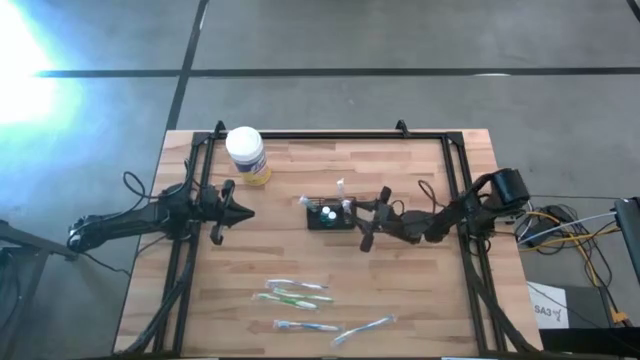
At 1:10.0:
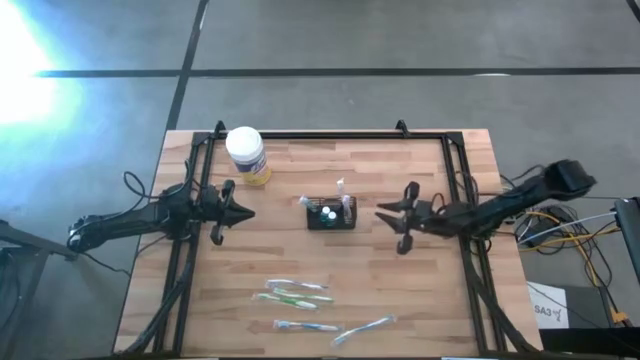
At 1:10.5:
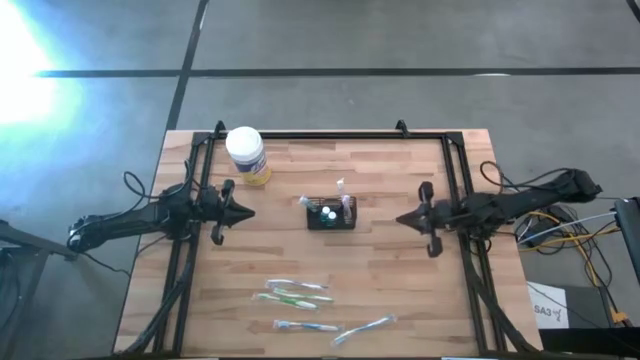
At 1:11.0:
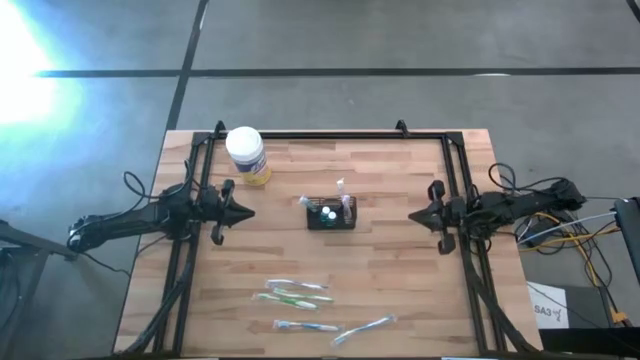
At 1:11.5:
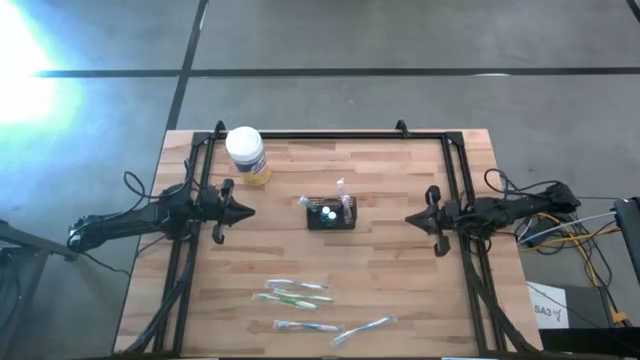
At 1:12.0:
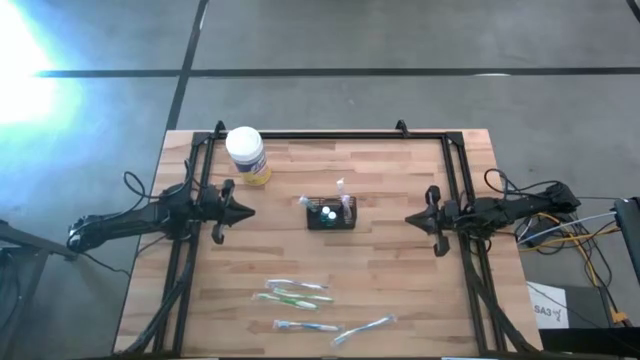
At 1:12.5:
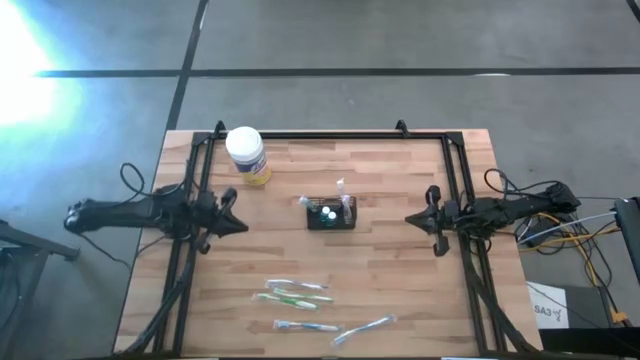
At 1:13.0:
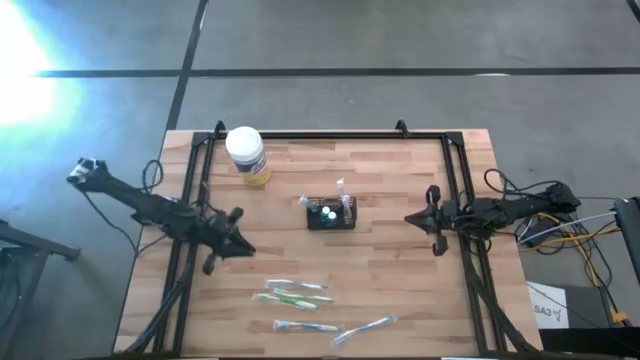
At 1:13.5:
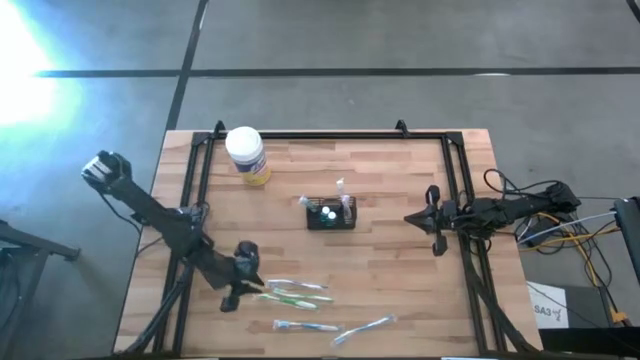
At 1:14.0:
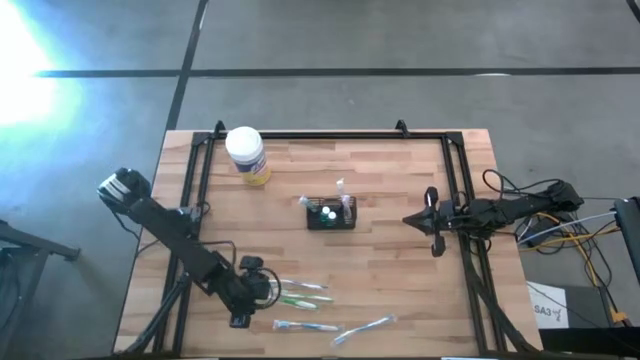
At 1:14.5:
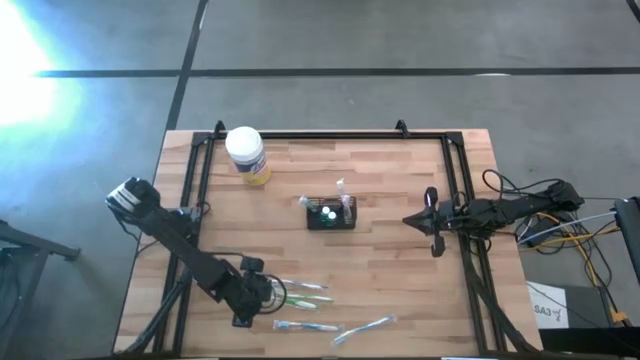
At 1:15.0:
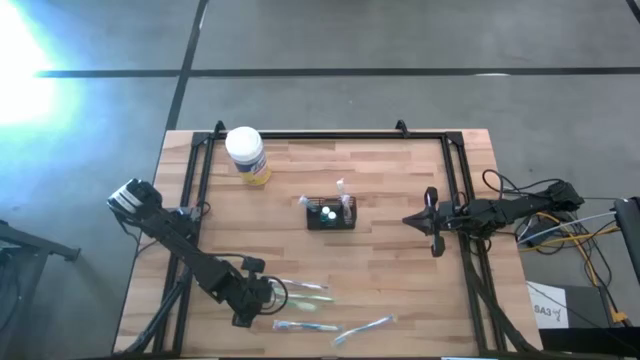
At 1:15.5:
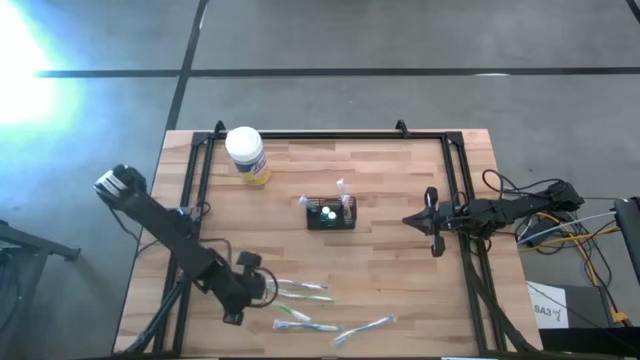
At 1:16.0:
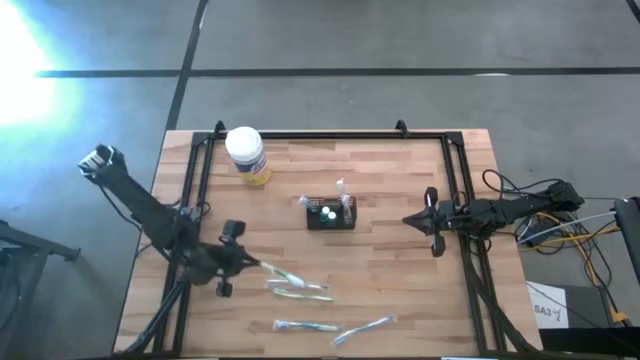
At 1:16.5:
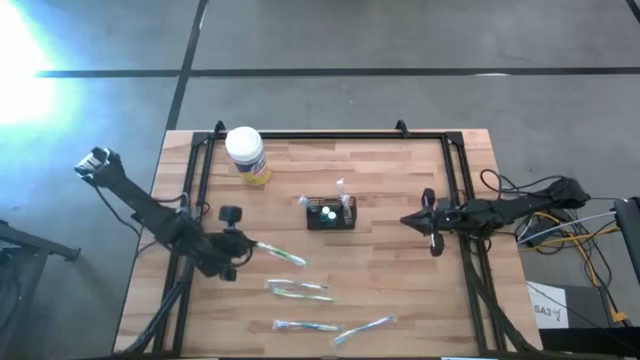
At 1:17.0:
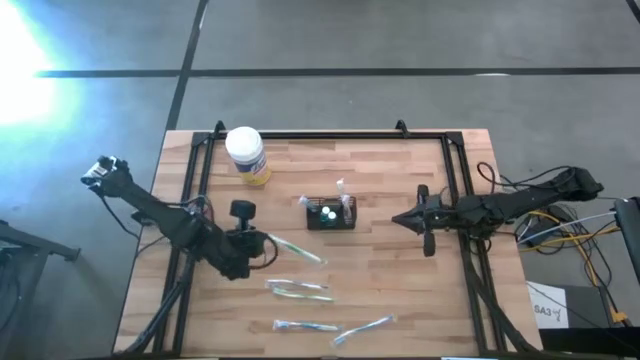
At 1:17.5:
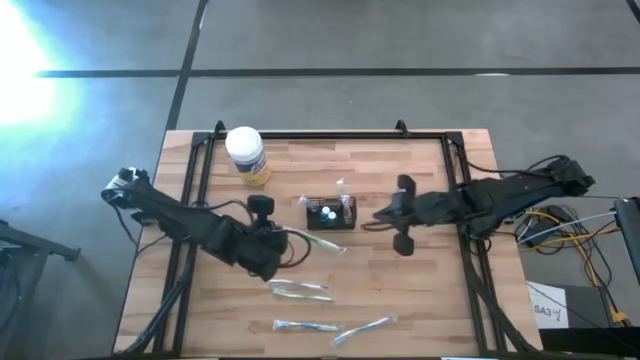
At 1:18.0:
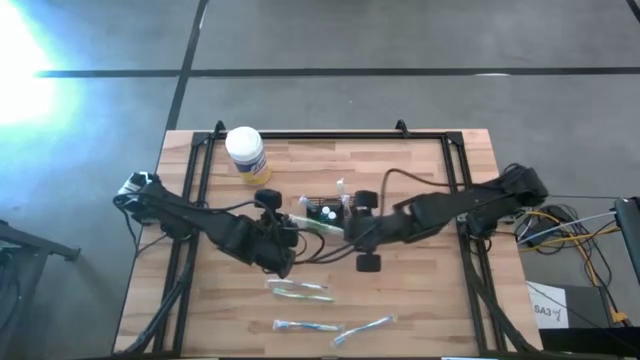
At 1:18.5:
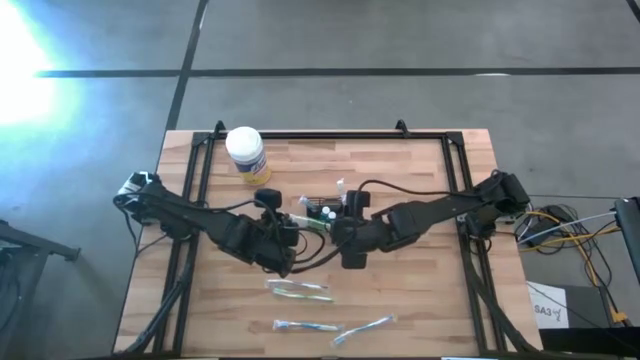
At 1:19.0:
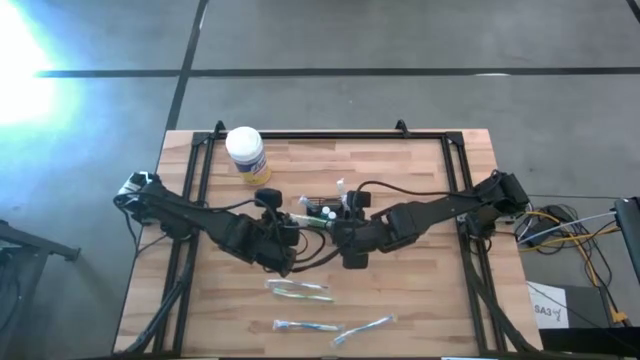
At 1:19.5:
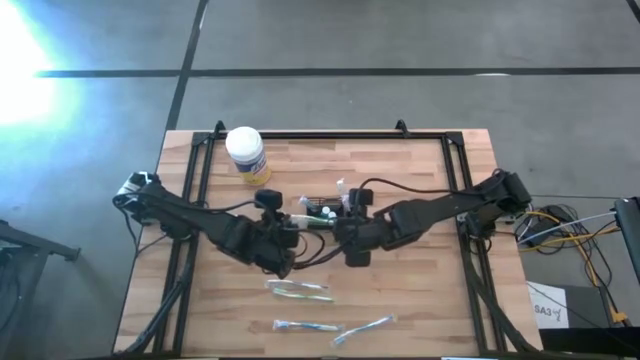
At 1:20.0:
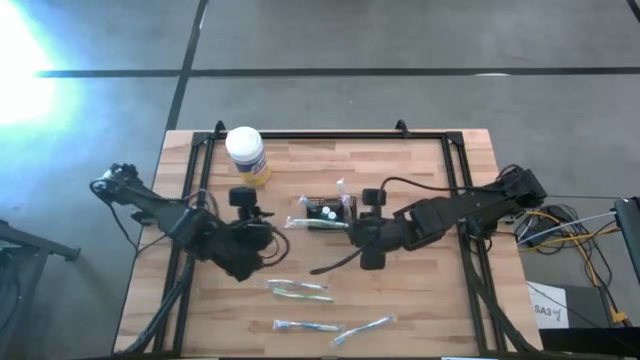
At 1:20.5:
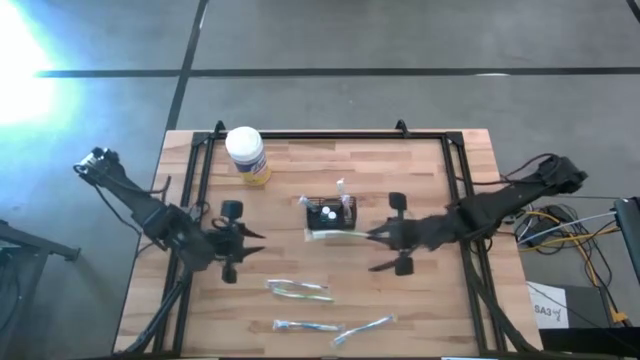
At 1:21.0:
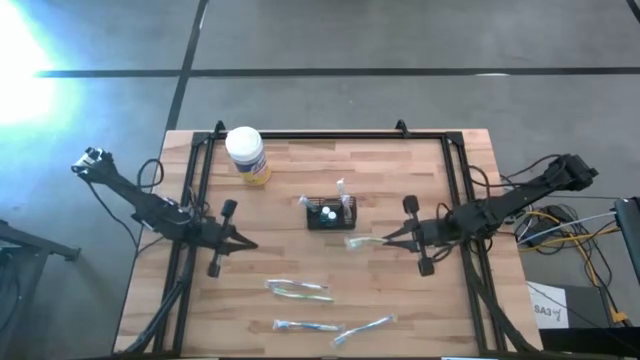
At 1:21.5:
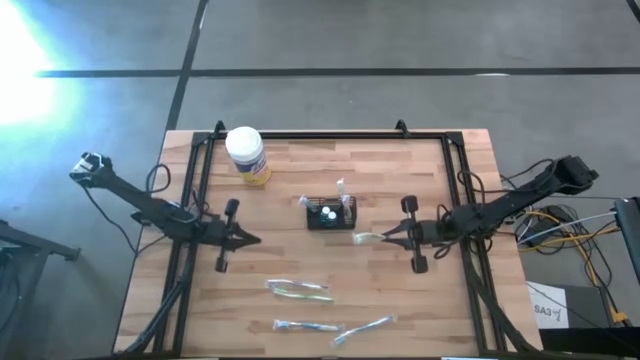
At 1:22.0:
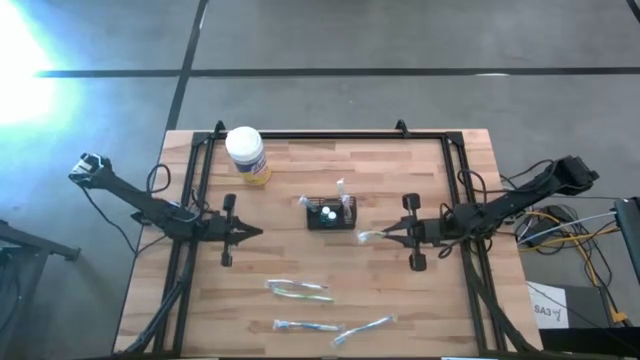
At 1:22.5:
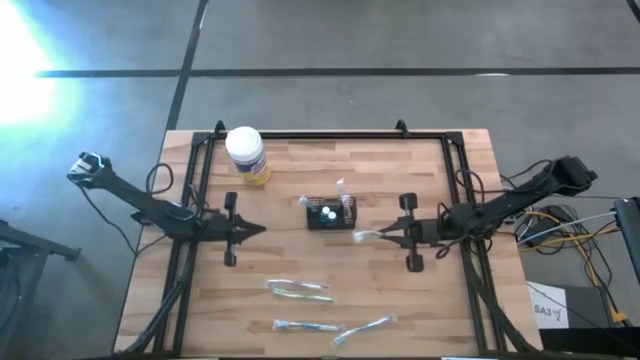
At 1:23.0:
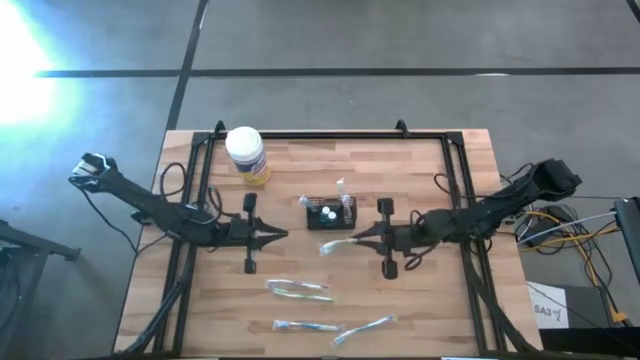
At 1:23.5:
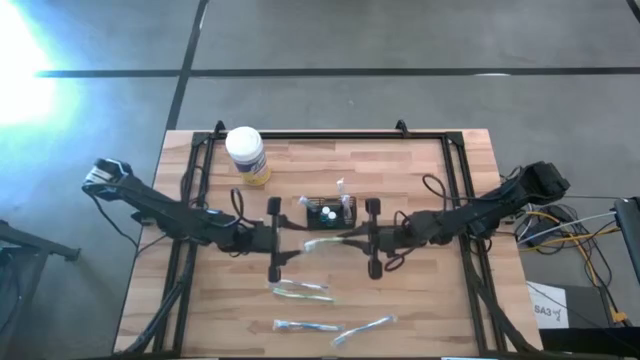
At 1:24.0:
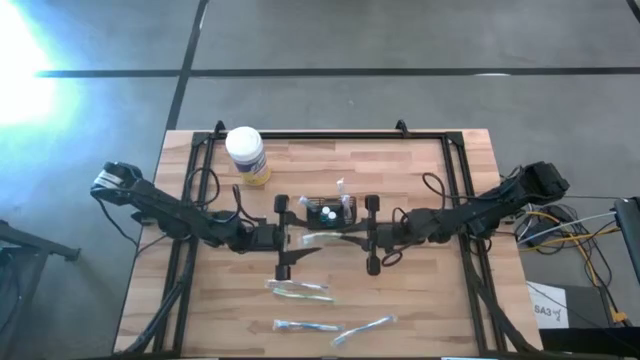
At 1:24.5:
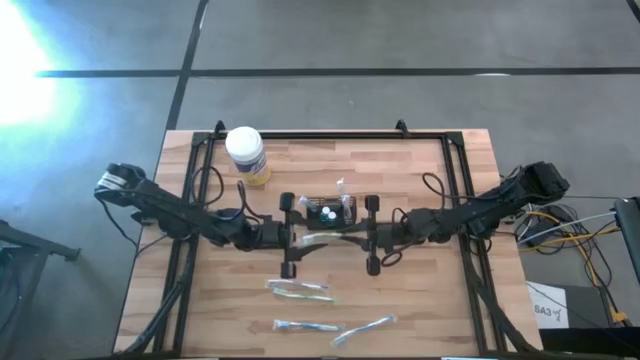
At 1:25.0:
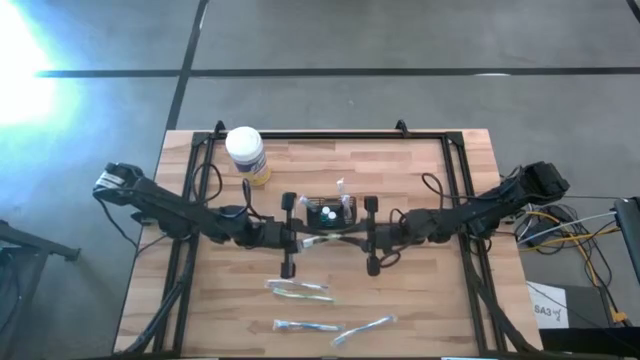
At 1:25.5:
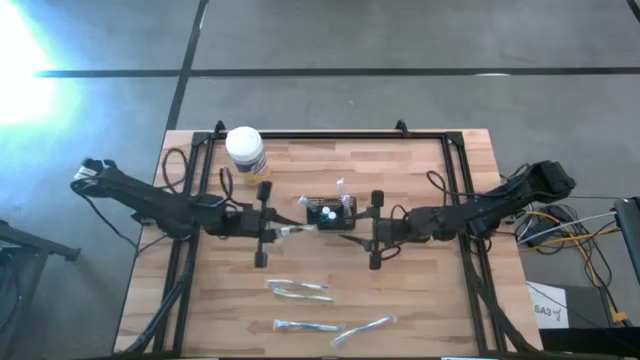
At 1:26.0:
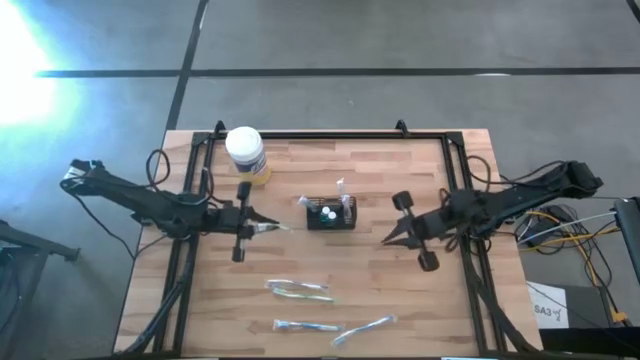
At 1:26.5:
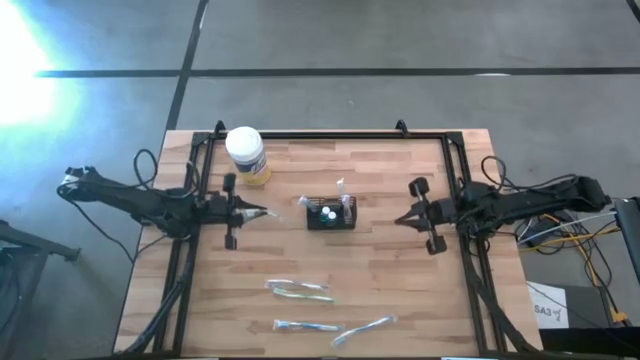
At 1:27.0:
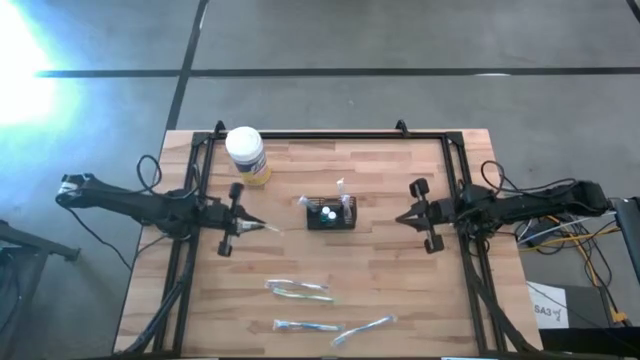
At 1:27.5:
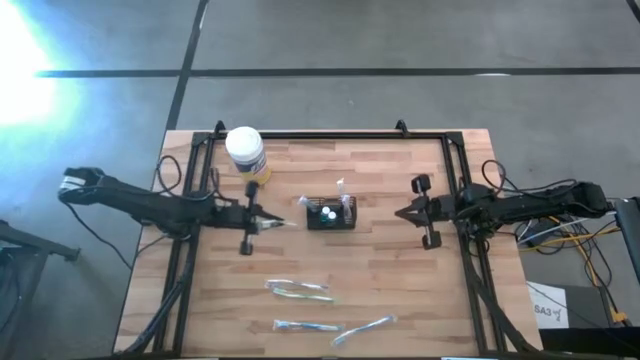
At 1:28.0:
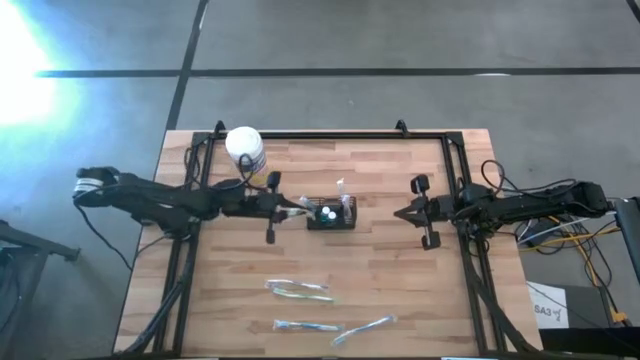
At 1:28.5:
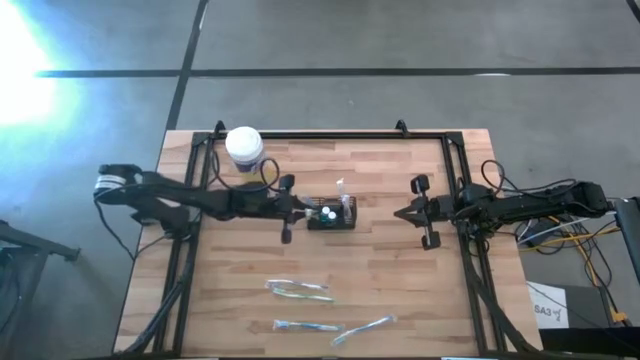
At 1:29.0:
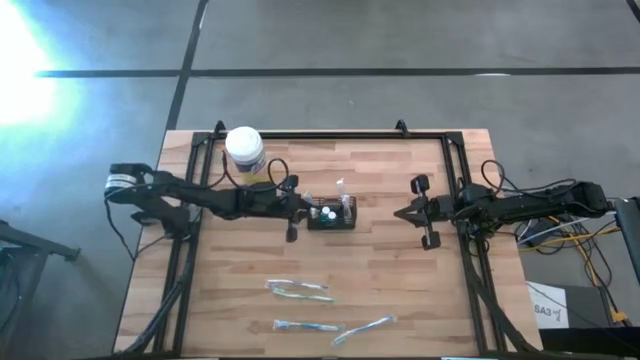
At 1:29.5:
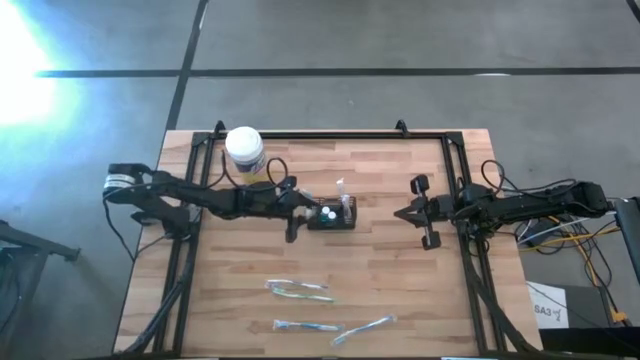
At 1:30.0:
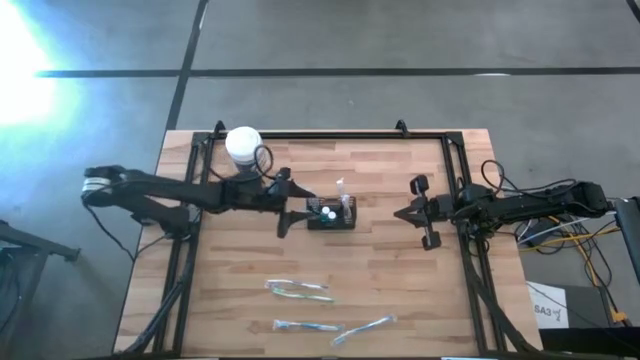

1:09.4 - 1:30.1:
Task: Pick & Place toothbrushing station
Put the bottom green toothbrush into the black wire organizer

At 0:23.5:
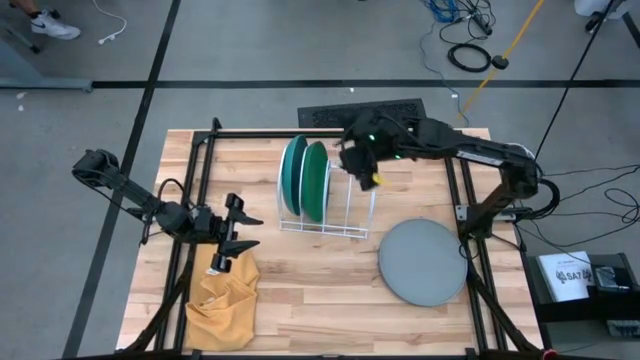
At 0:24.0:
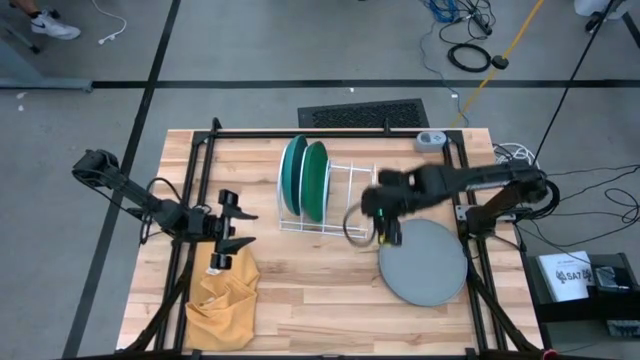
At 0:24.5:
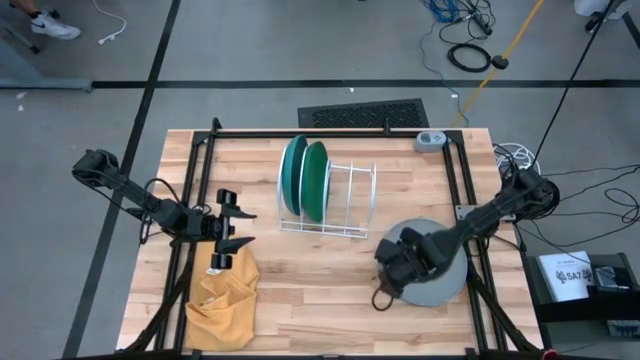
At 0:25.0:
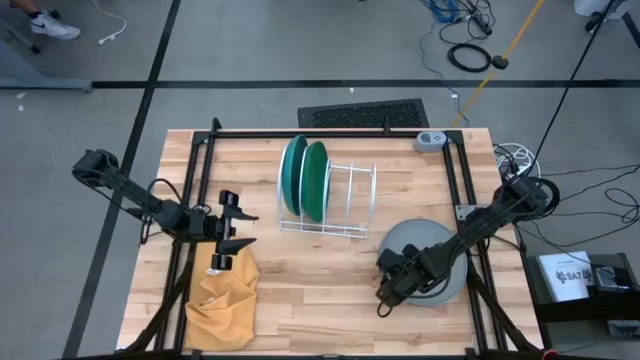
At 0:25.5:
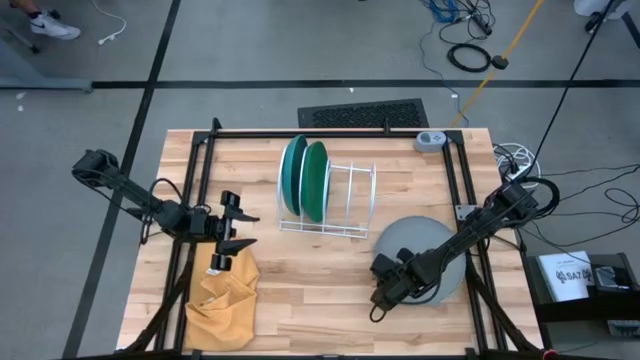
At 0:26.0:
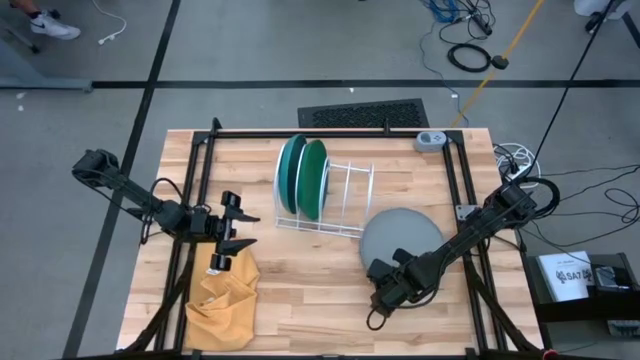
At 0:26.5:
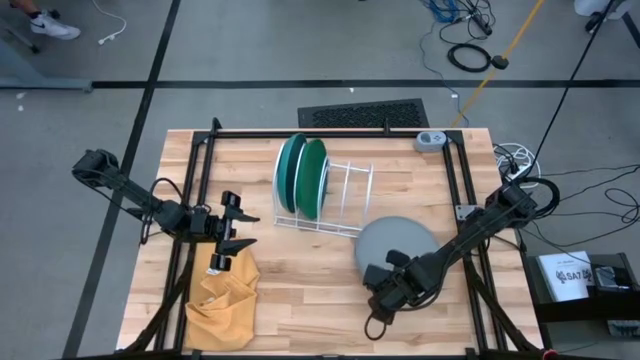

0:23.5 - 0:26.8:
Task: Sort dishes
Put the gray plate in the white dish rack
